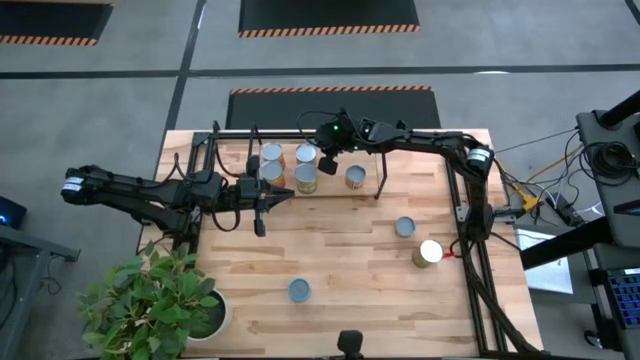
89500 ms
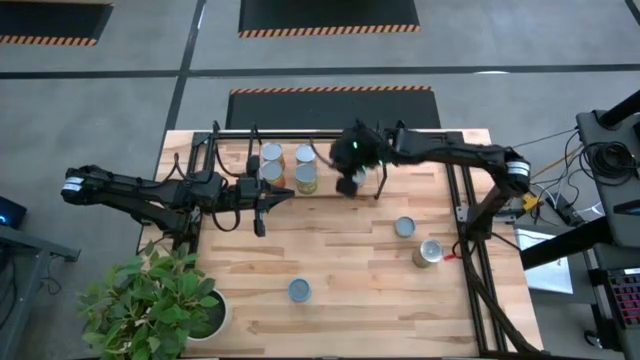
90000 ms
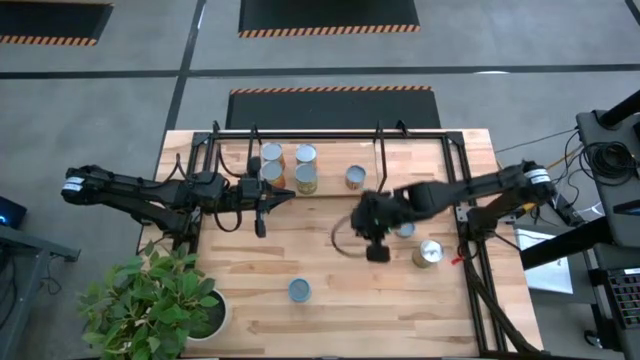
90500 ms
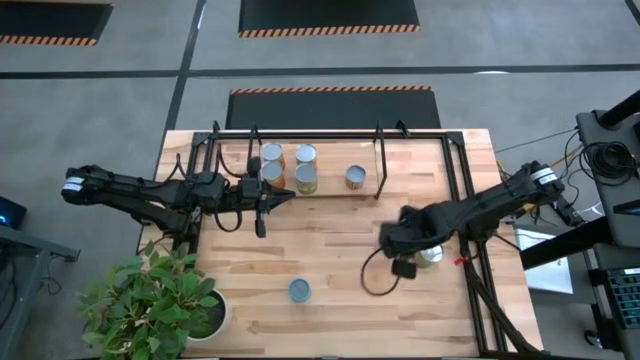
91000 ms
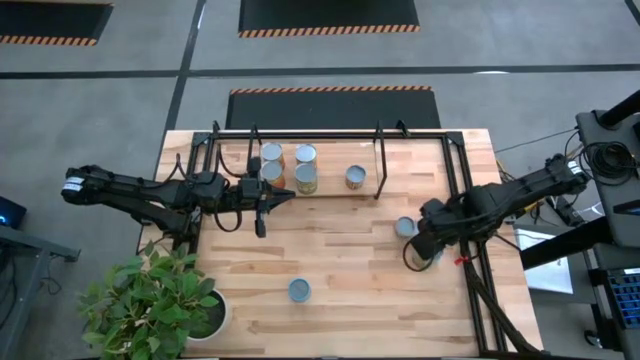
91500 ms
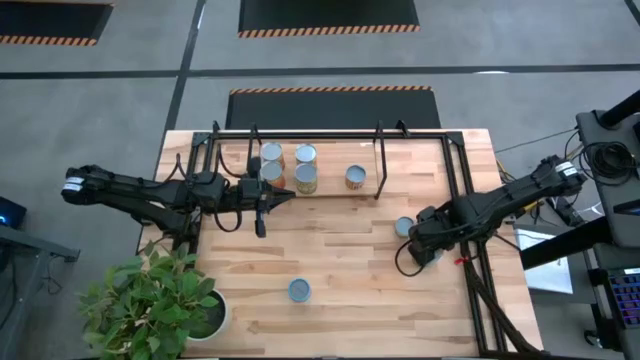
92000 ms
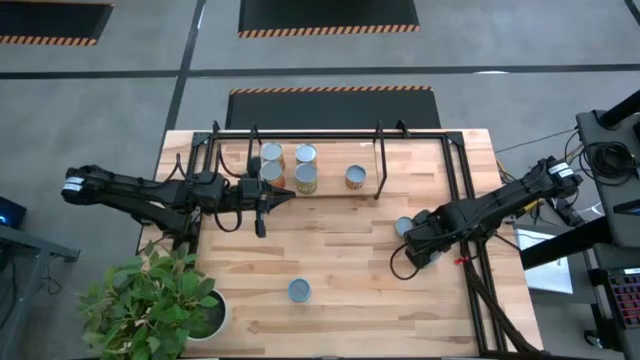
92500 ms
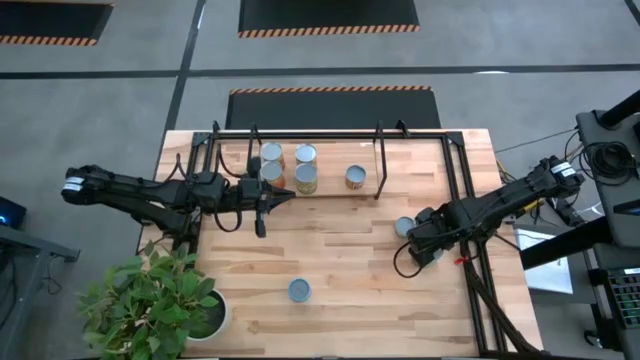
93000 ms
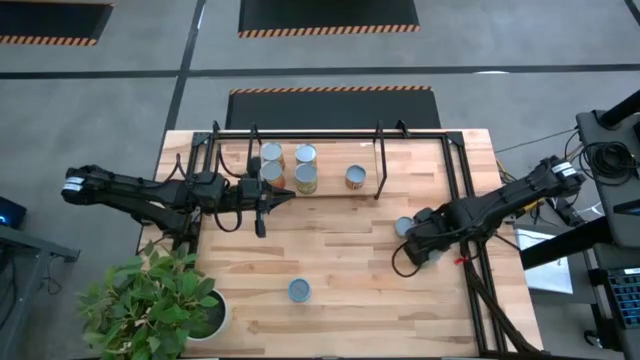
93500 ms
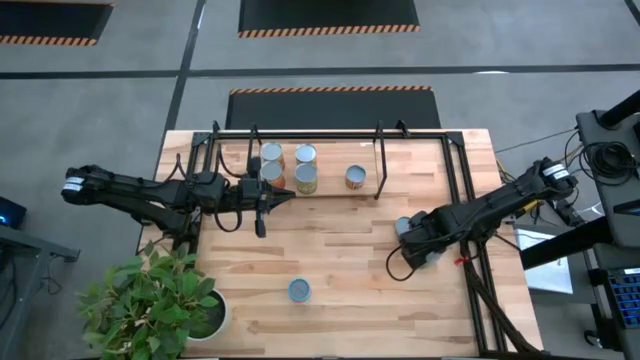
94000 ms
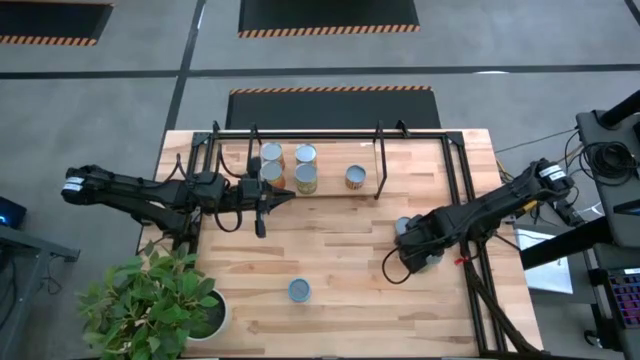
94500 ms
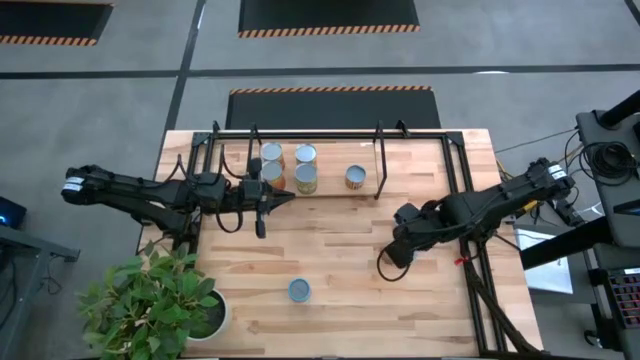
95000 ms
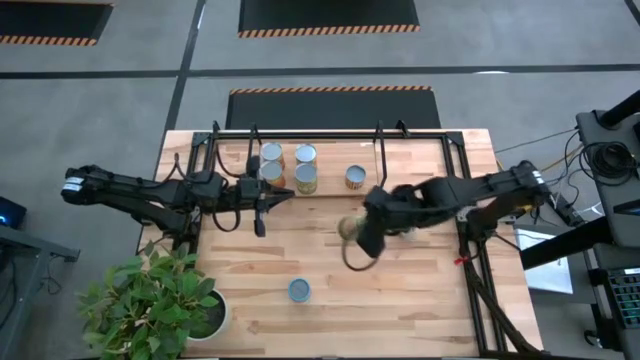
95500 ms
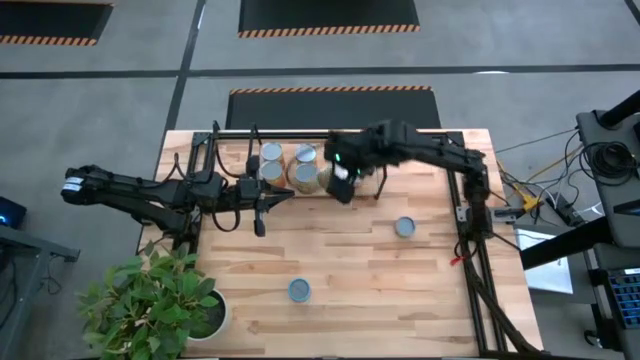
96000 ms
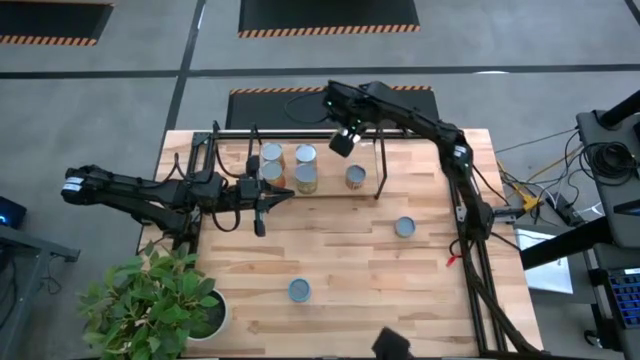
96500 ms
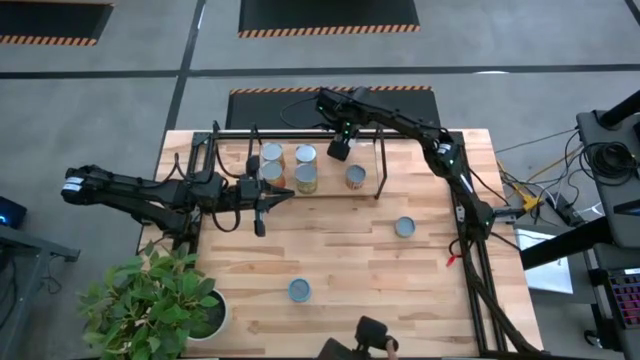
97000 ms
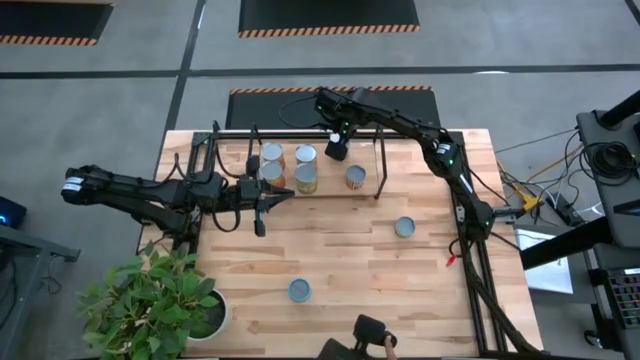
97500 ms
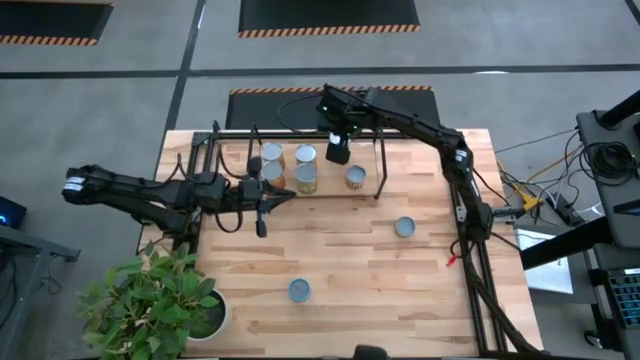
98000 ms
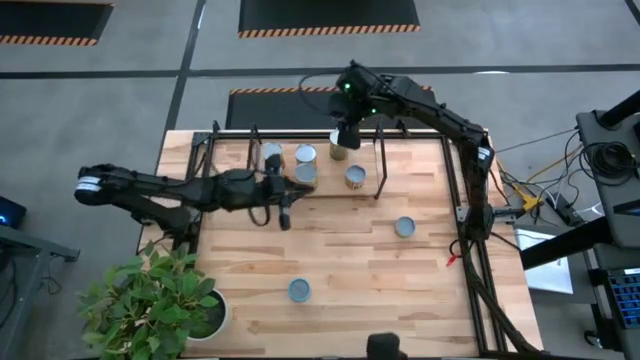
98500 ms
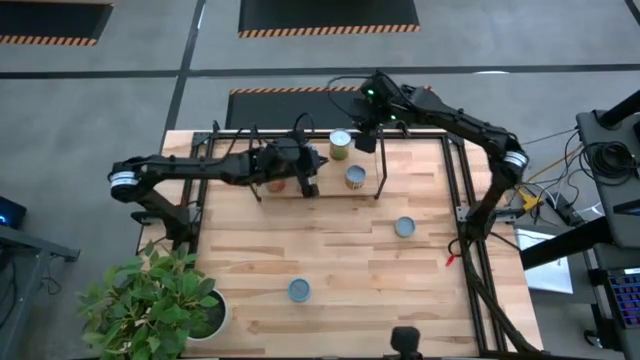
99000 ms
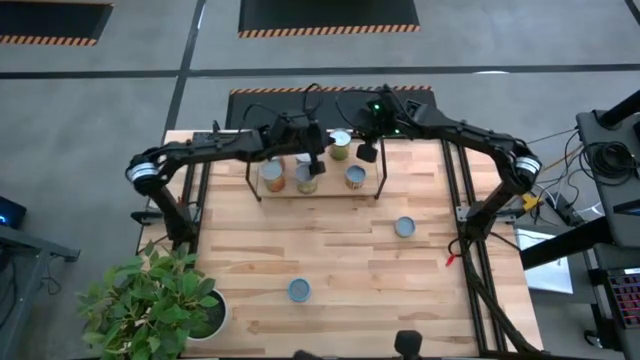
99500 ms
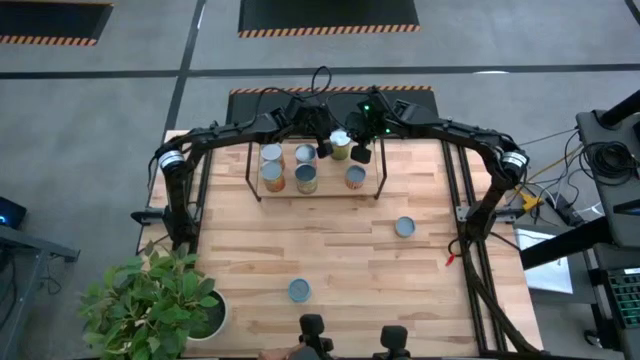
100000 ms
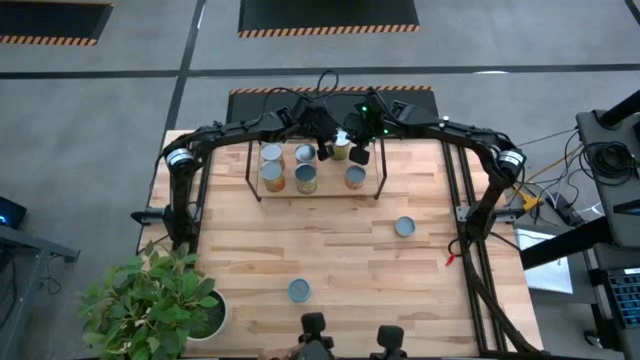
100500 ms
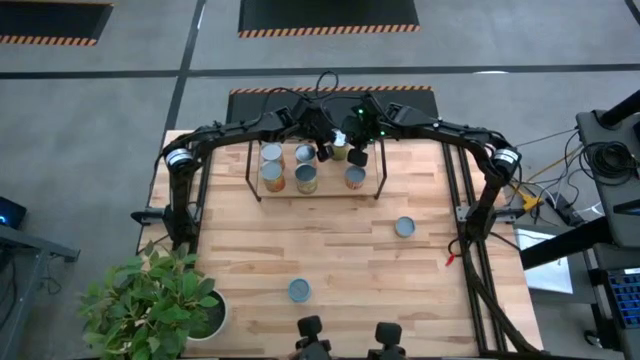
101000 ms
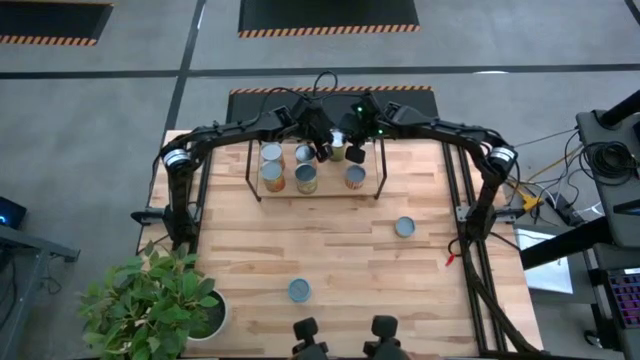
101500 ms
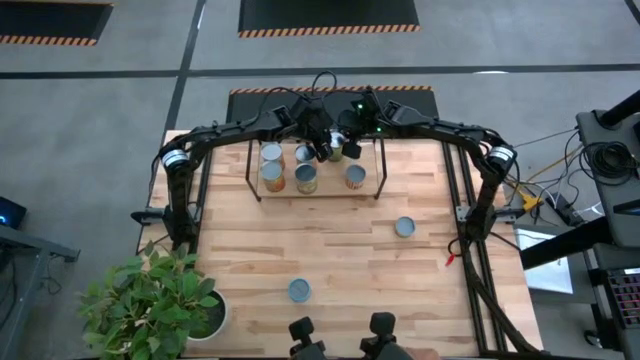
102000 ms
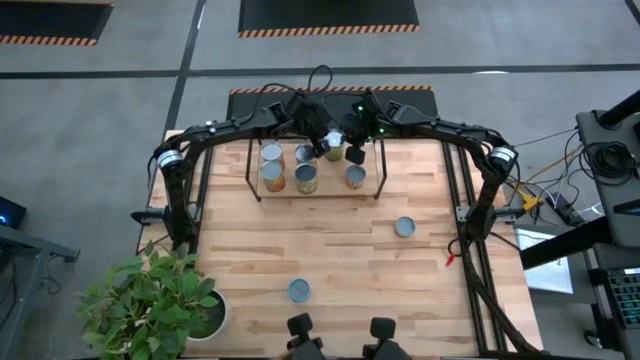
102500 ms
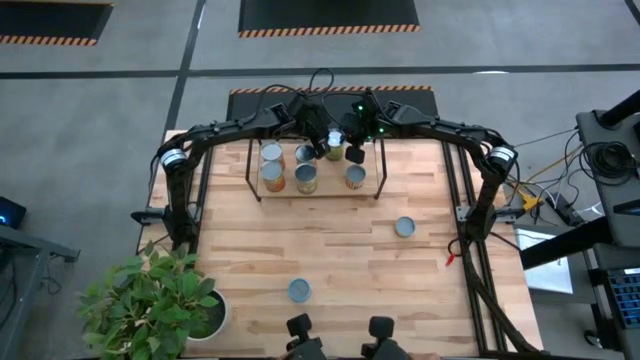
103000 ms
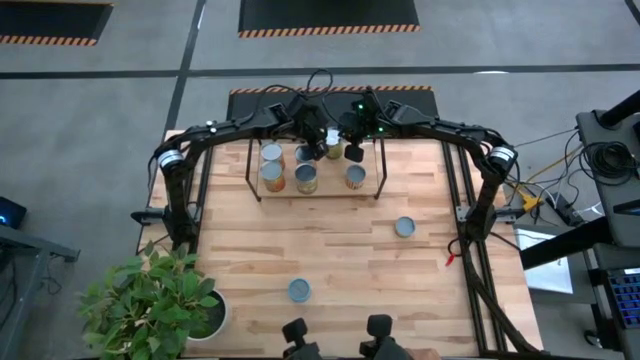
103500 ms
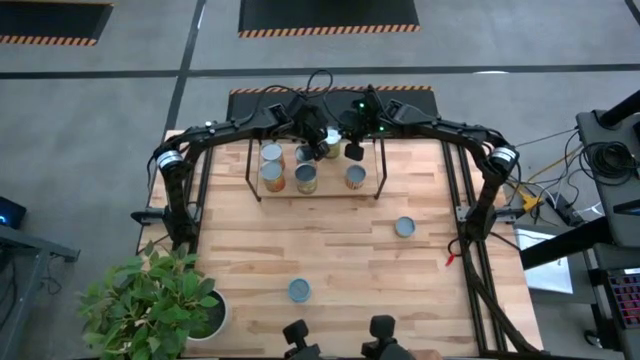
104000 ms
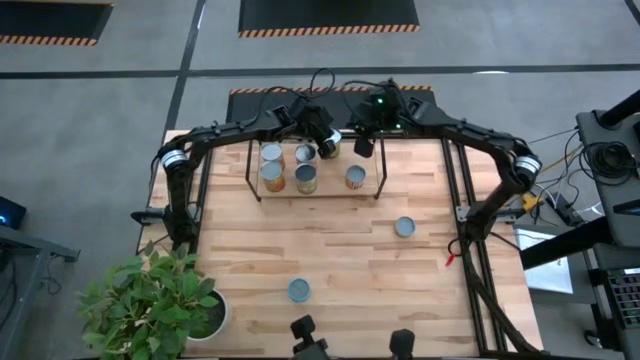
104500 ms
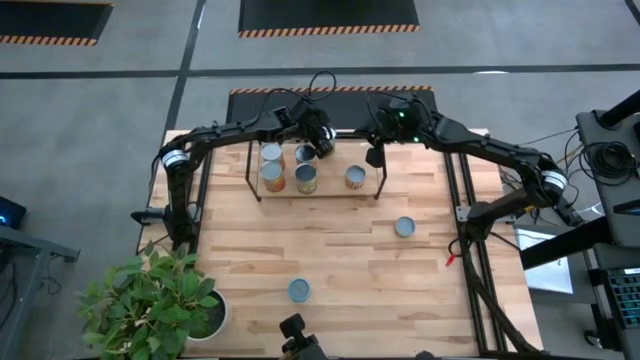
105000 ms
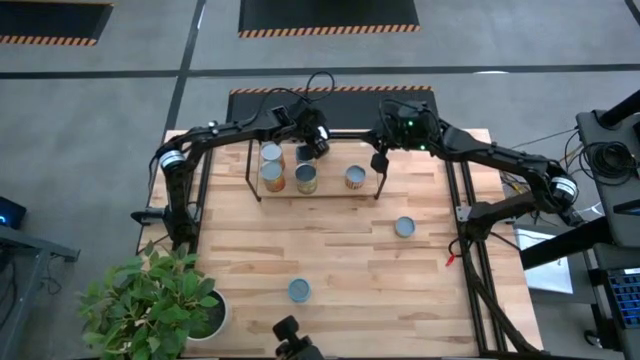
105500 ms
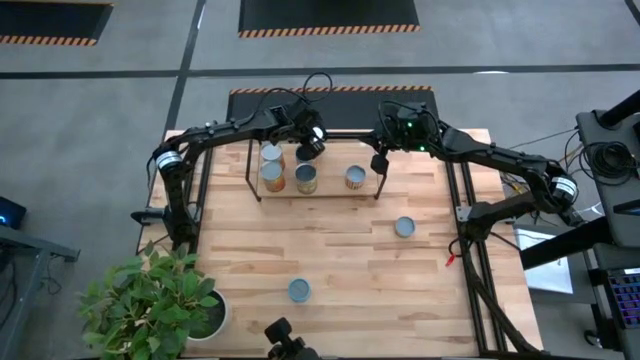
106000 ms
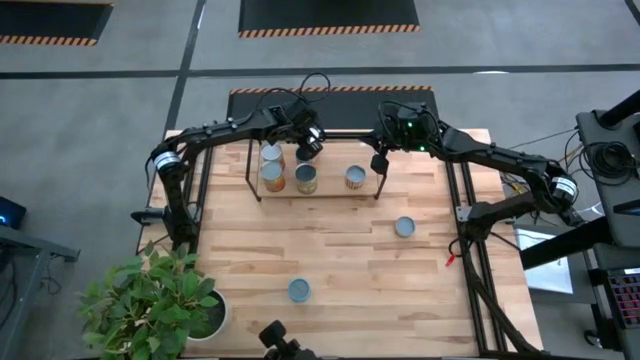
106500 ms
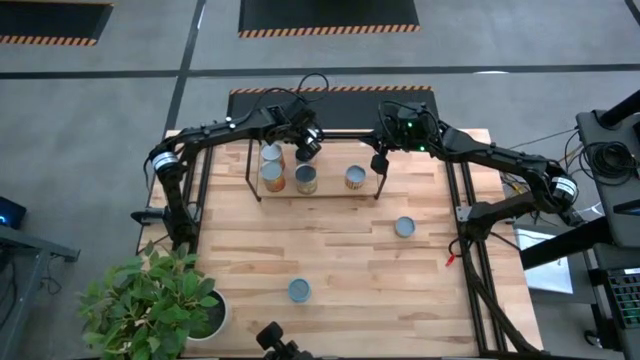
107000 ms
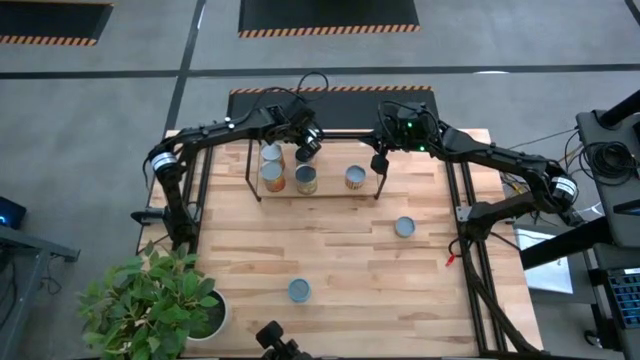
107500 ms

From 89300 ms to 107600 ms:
Task: Pick and place cans onto a shelf
Put the big green canned orange on the shelf aligned with the other big orange canned corn

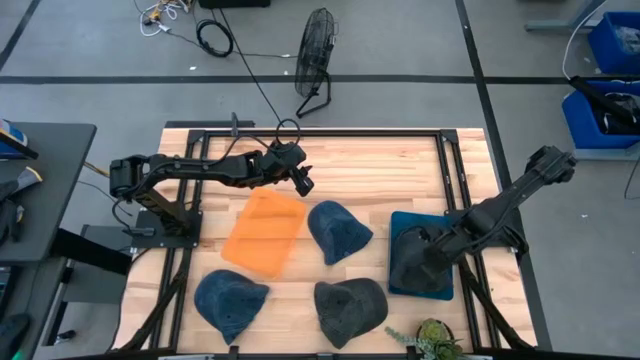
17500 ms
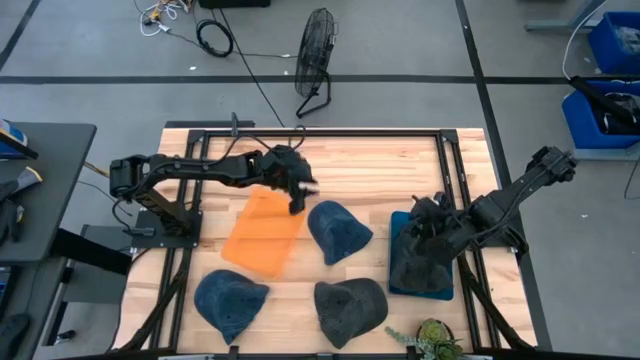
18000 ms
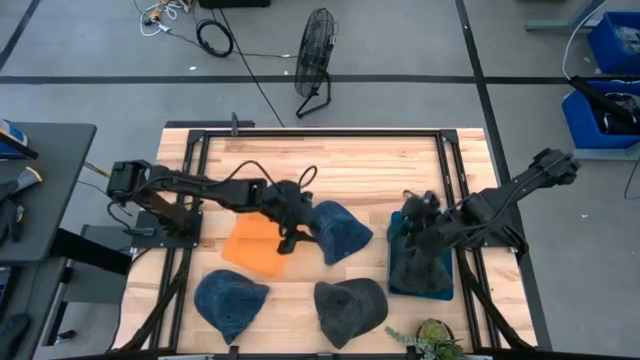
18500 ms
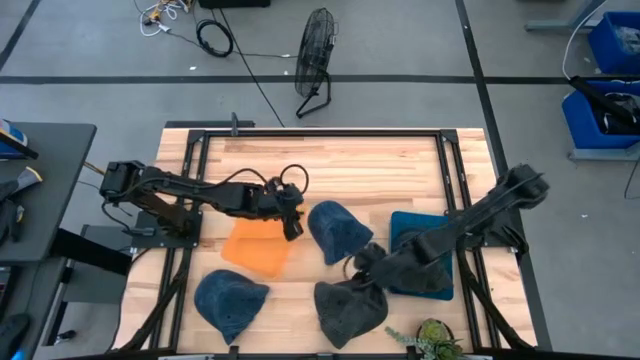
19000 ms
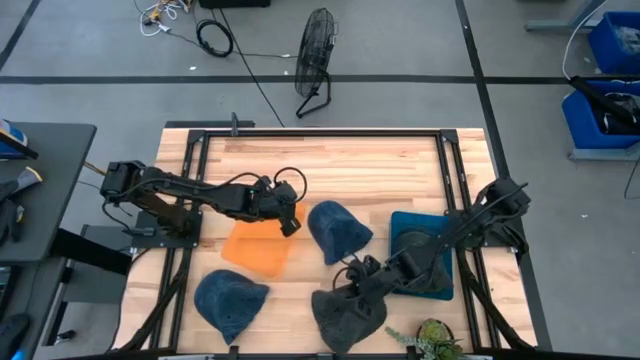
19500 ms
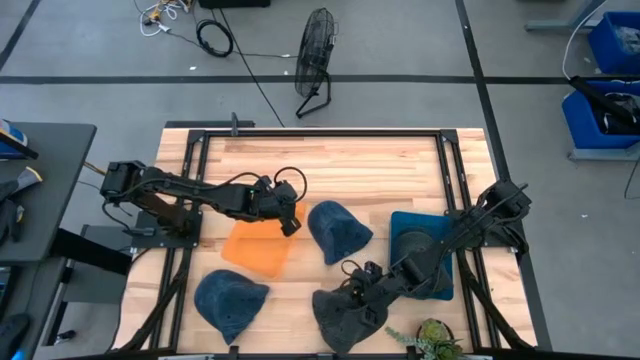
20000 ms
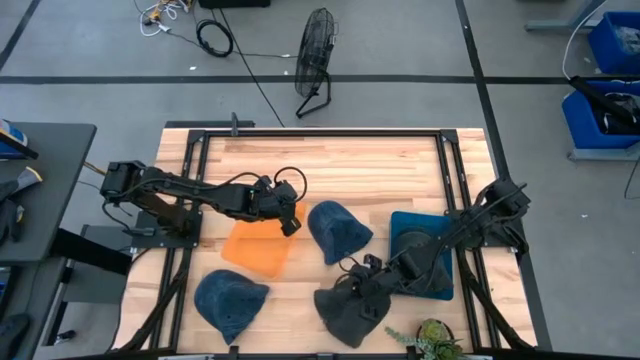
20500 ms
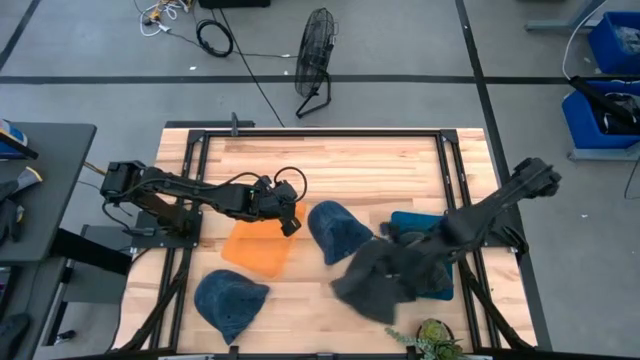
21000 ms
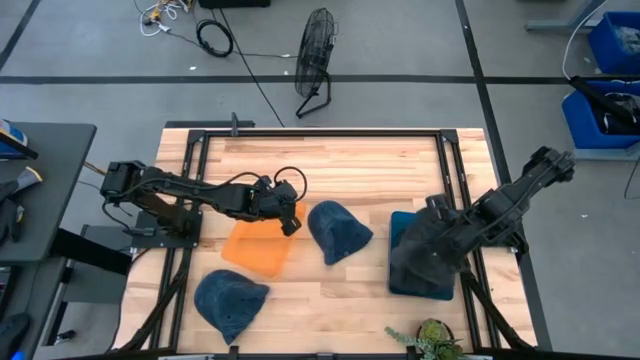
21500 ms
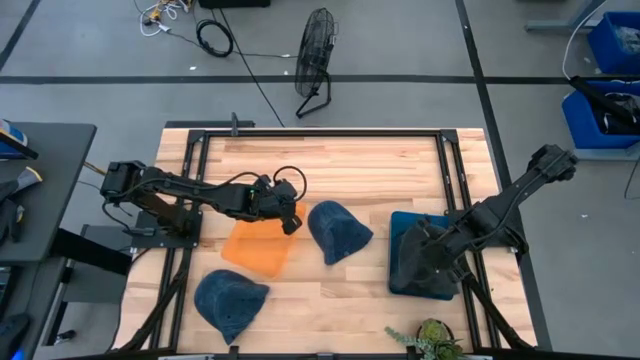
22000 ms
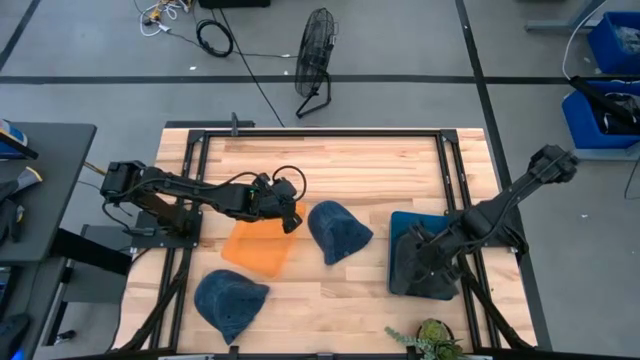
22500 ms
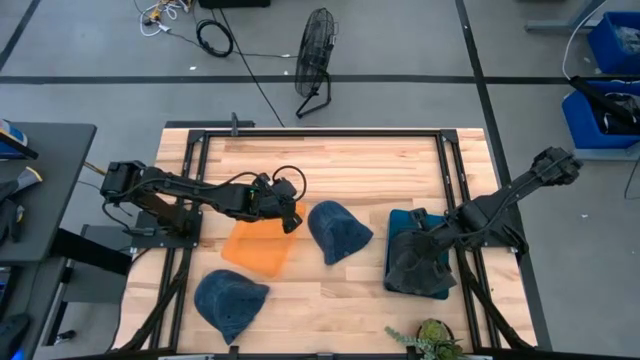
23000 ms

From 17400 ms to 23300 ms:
Task: Pick & Place hat
Put the black cap into the blue bin
